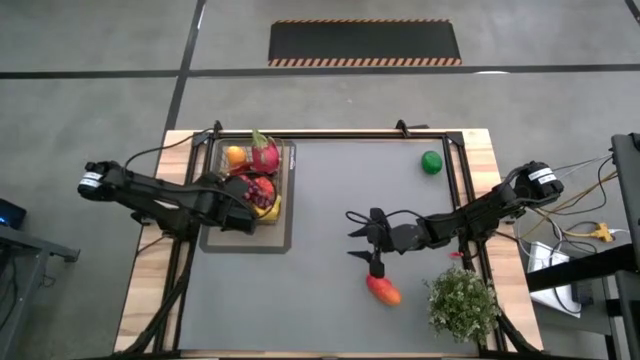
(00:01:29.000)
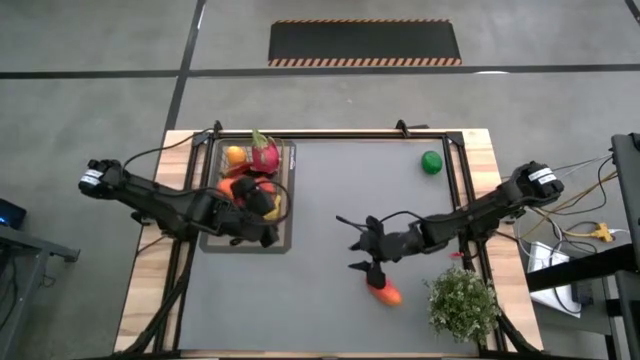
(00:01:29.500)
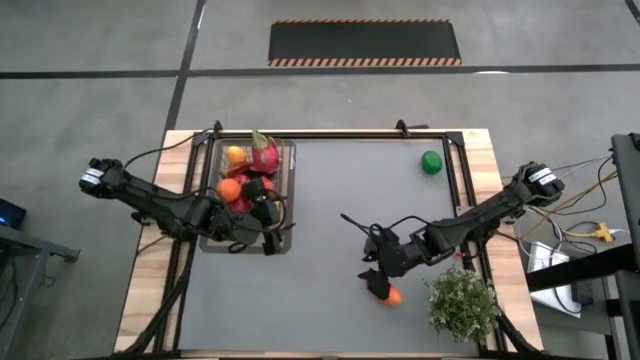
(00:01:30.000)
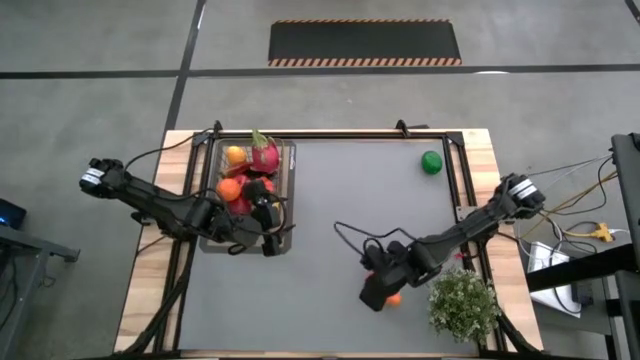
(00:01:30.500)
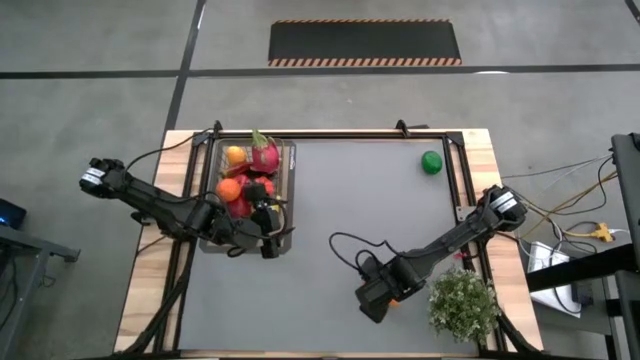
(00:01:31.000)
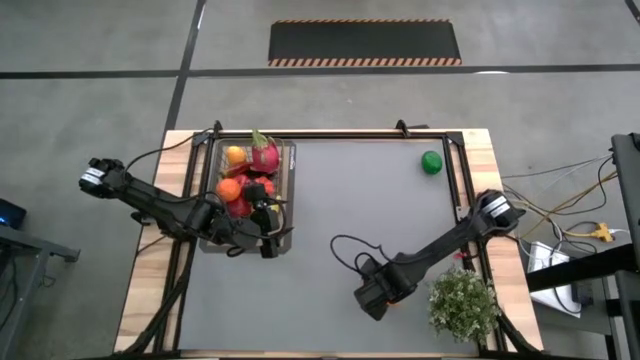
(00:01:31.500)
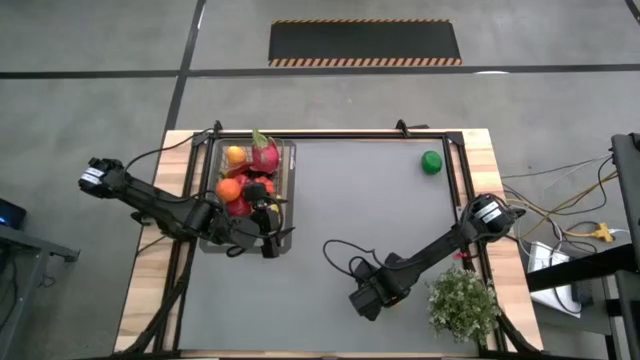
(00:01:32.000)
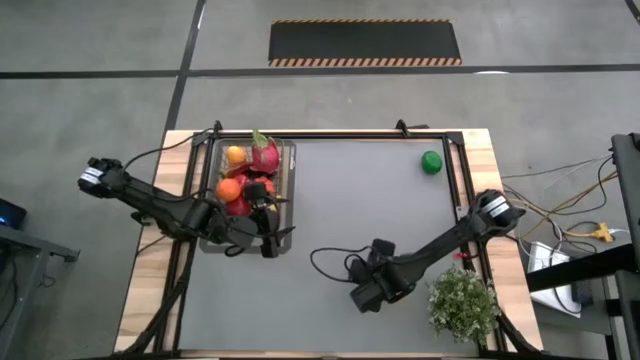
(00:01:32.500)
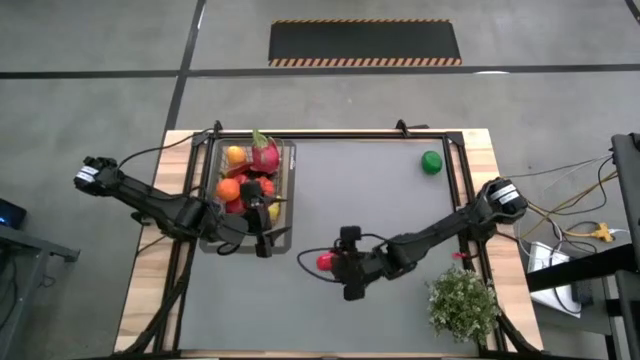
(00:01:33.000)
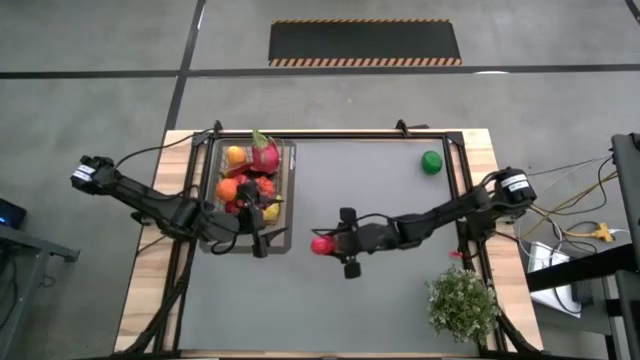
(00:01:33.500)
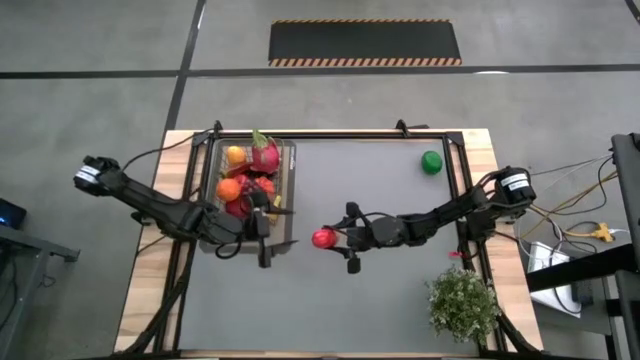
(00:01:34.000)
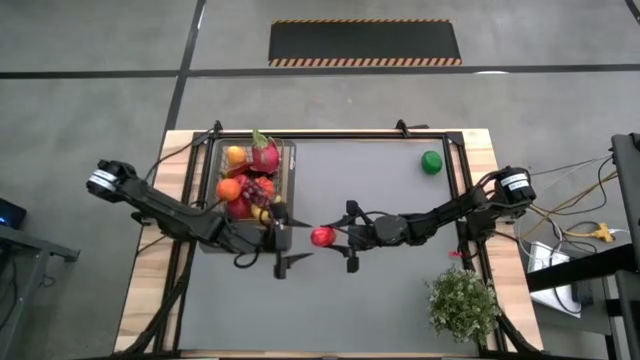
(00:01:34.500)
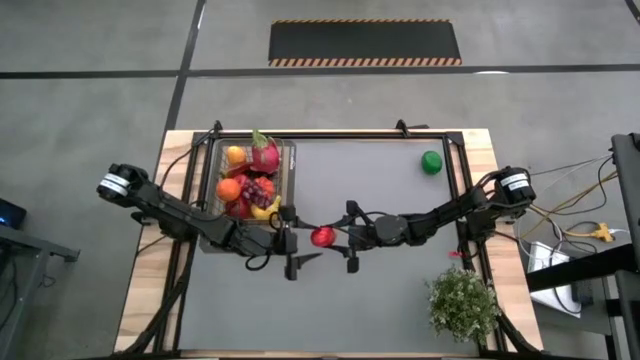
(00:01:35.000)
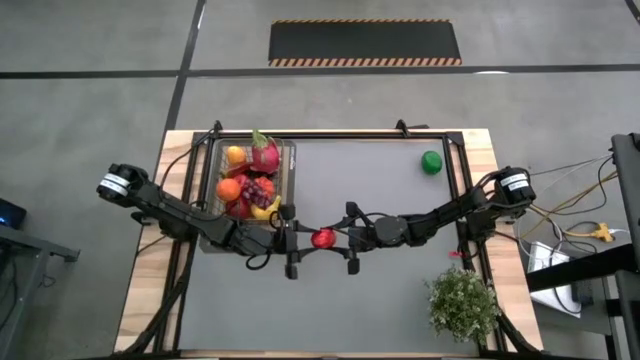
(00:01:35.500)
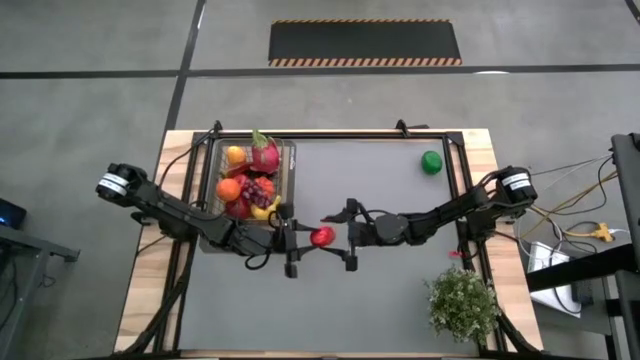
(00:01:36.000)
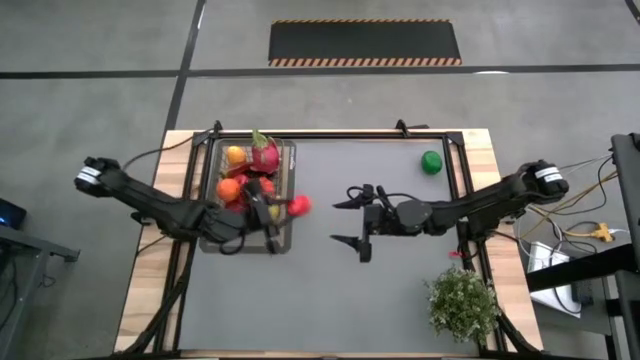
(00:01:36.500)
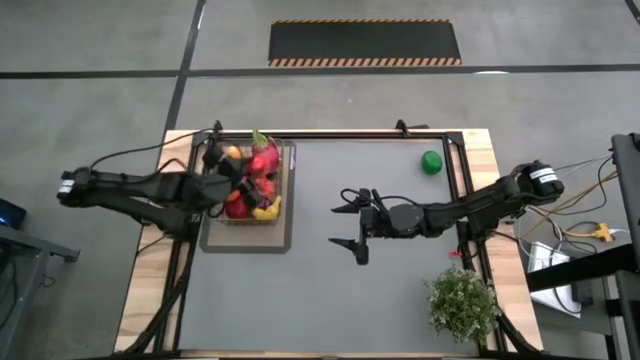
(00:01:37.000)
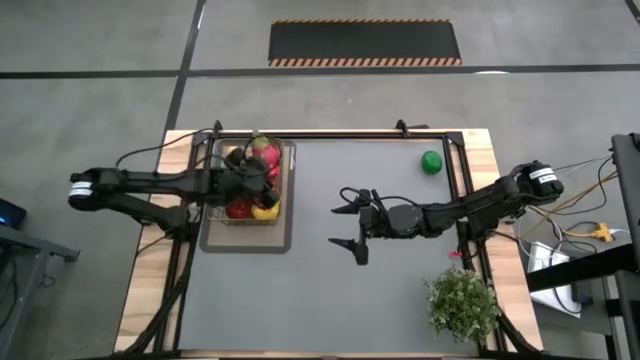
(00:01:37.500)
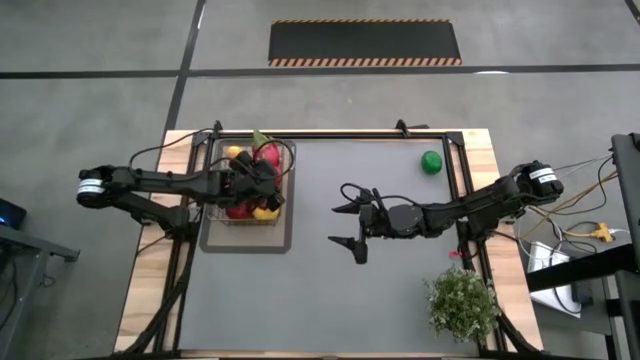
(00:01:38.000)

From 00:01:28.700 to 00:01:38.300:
Task: Build produce basket
Put the orange mango into the gold wire basket

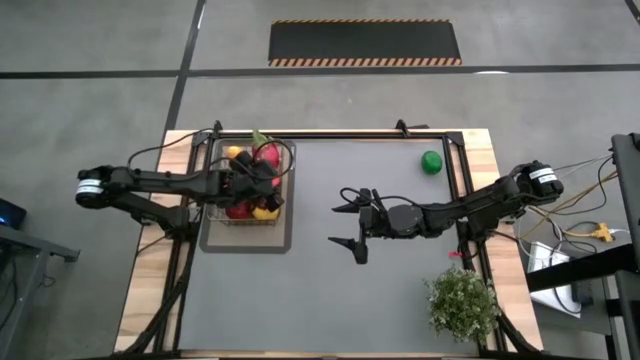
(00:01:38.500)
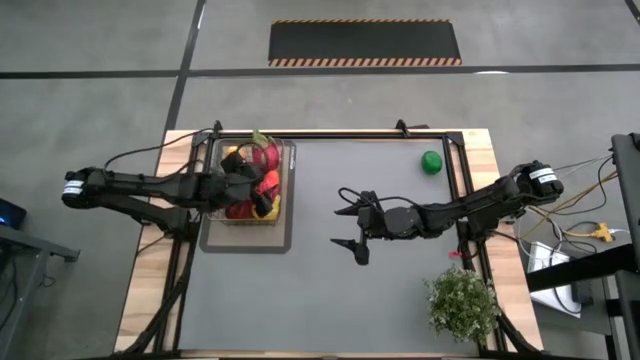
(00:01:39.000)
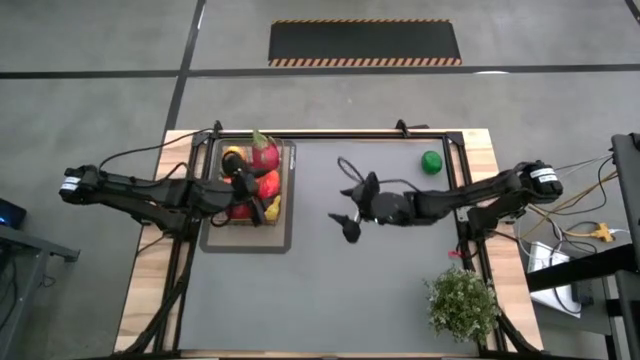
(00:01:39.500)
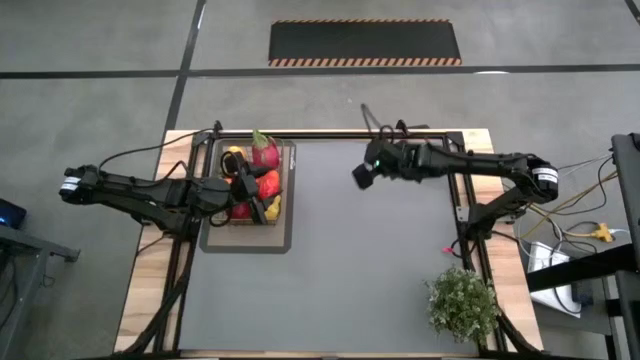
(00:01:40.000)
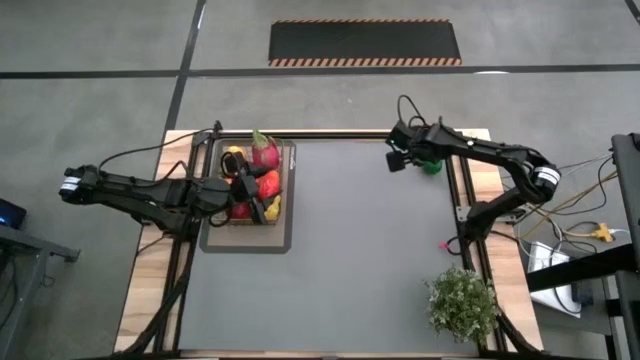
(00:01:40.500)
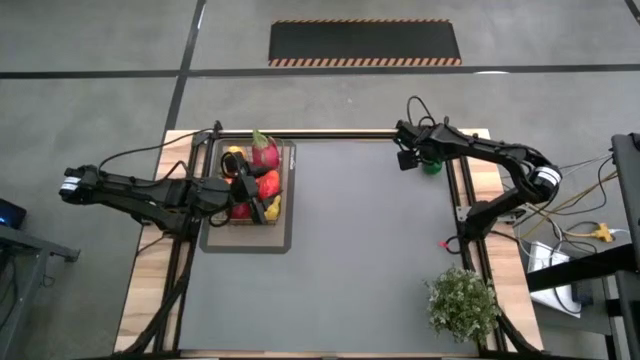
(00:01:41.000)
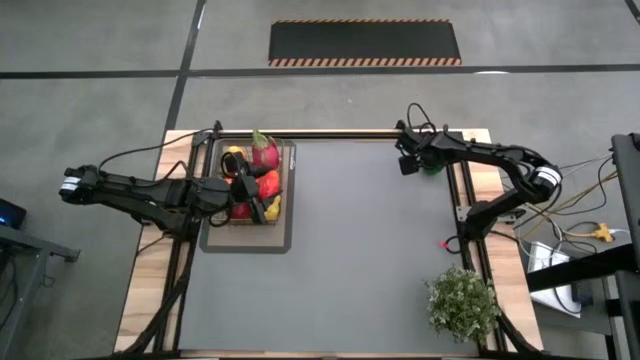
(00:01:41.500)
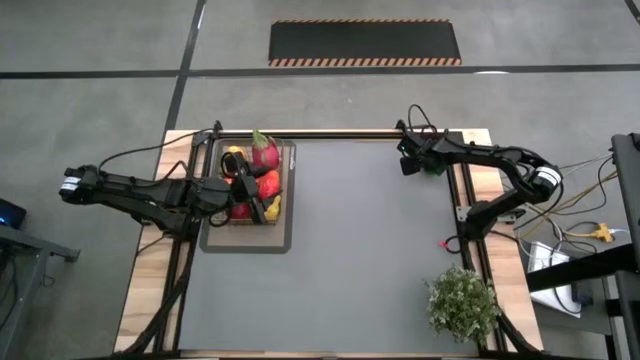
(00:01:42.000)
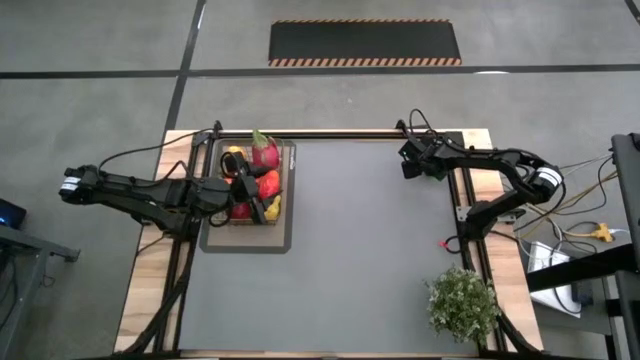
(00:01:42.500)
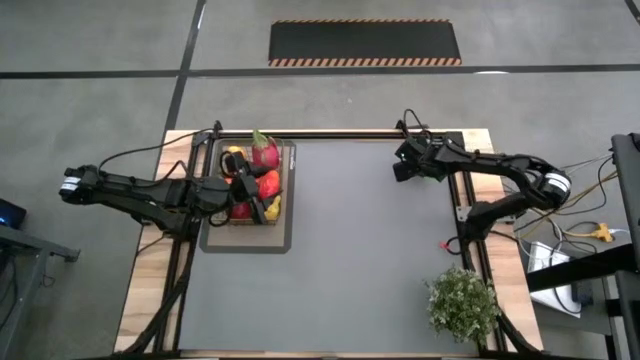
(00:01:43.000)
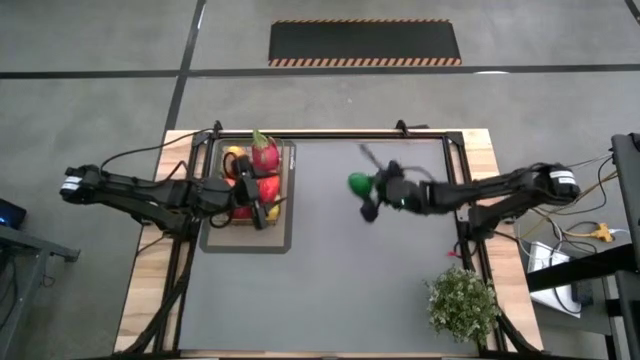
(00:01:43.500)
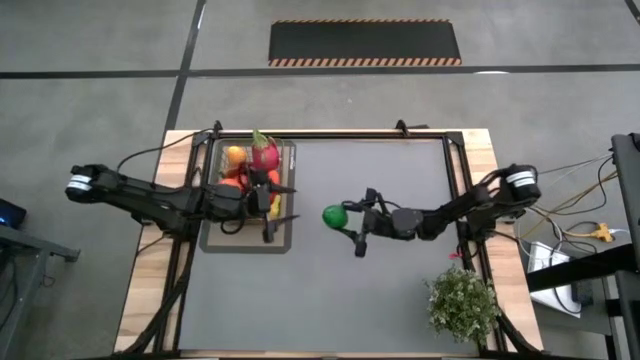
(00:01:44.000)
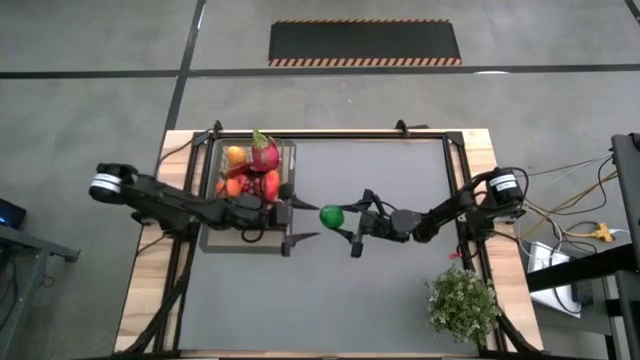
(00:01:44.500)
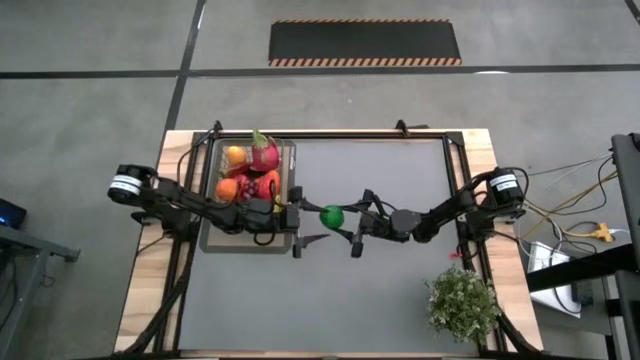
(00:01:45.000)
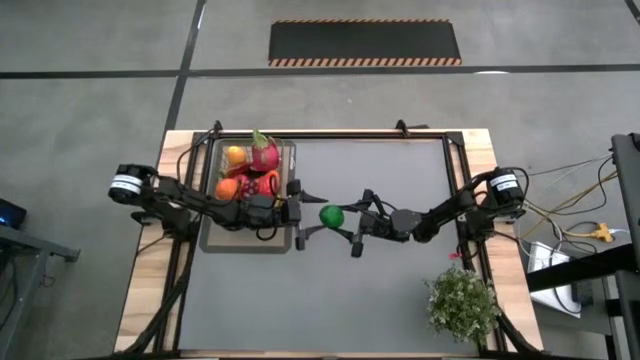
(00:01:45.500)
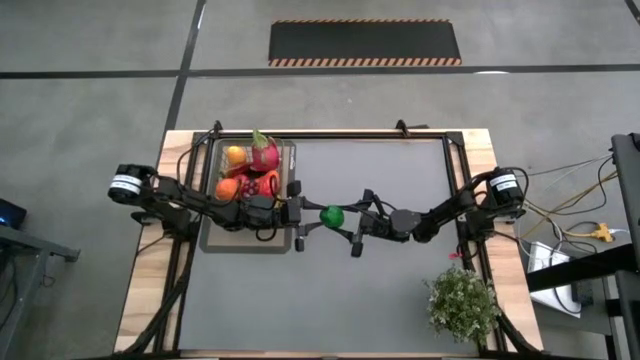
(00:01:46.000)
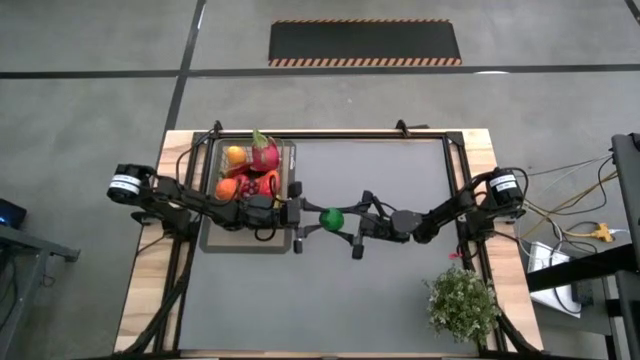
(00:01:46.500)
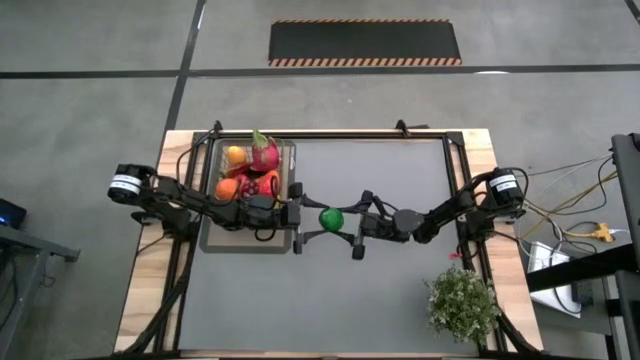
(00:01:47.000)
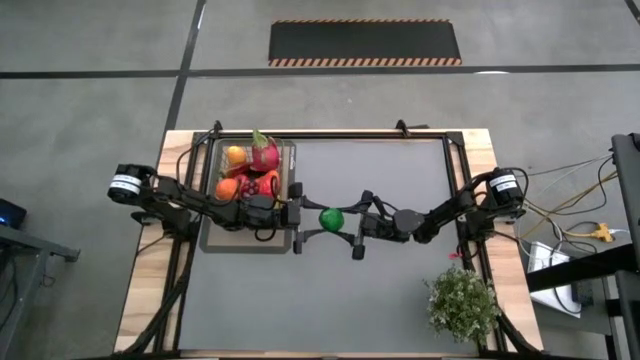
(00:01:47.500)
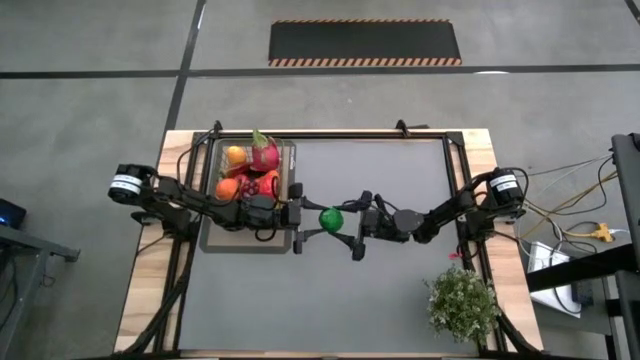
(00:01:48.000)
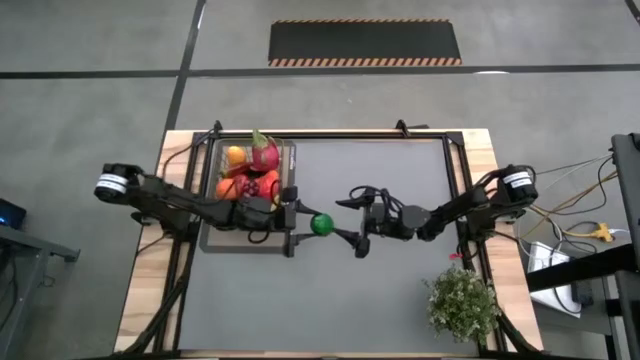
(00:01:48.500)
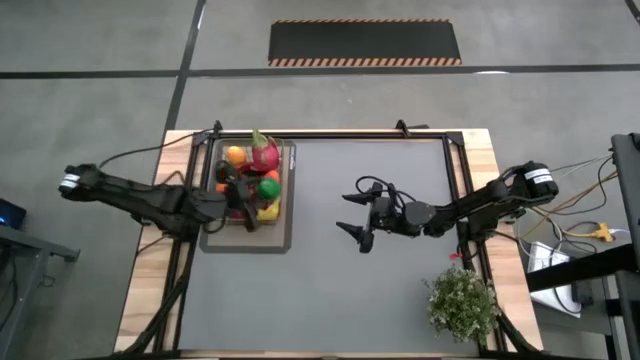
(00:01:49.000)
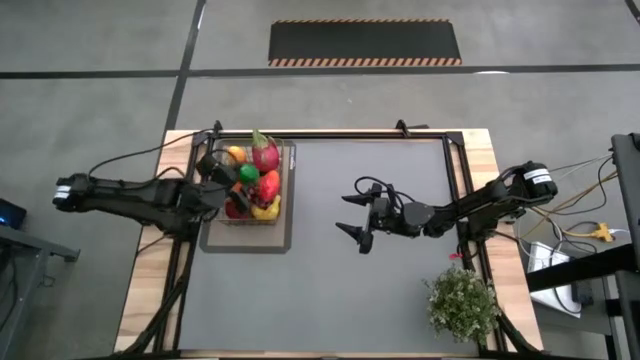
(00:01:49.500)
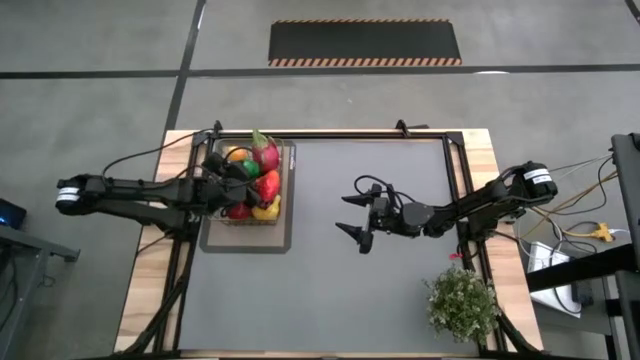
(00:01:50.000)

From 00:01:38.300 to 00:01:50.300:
Put the green lime into the gold wire basket
